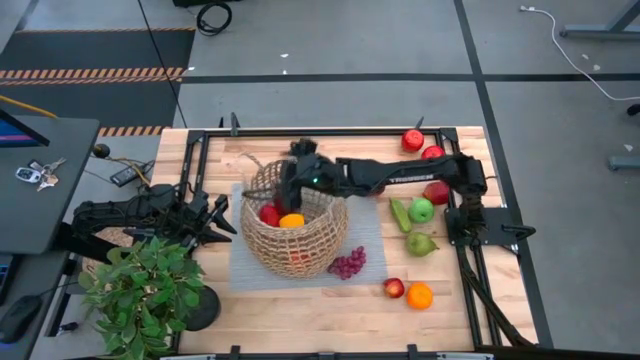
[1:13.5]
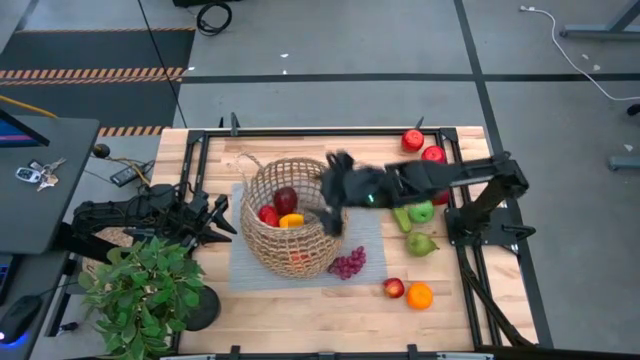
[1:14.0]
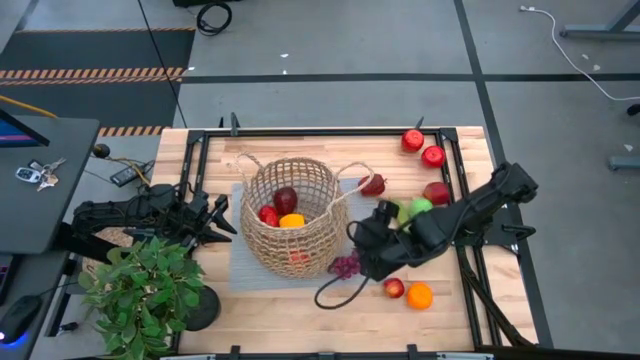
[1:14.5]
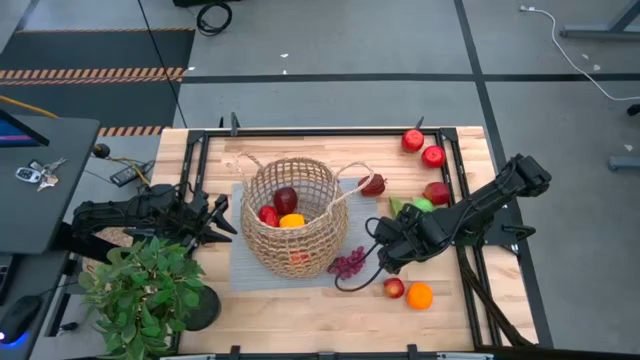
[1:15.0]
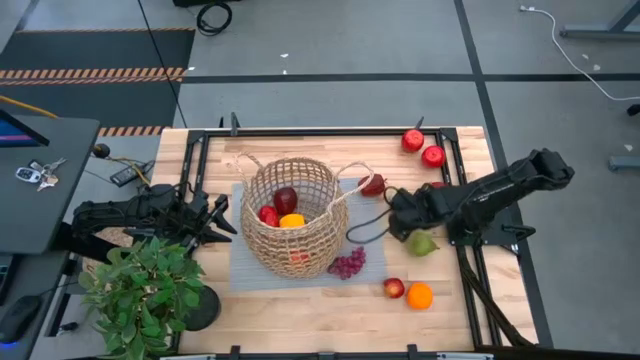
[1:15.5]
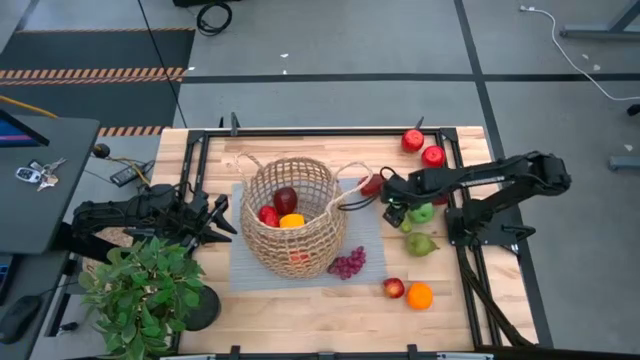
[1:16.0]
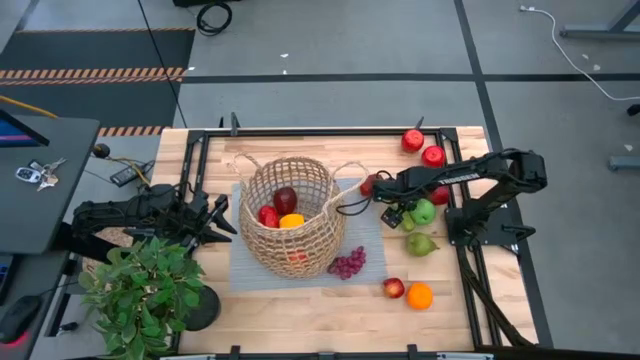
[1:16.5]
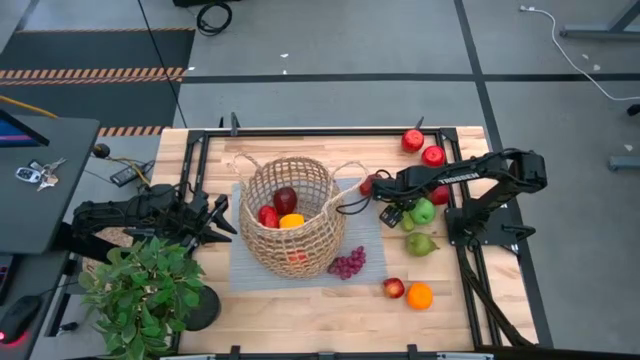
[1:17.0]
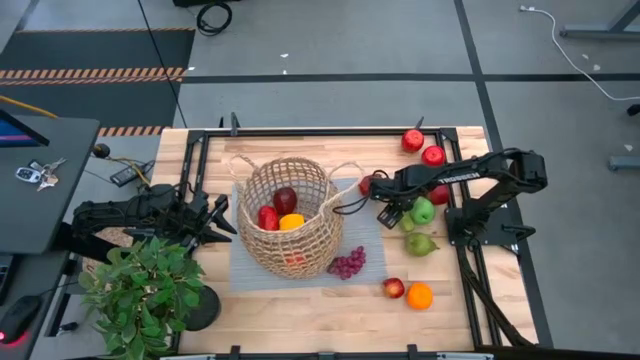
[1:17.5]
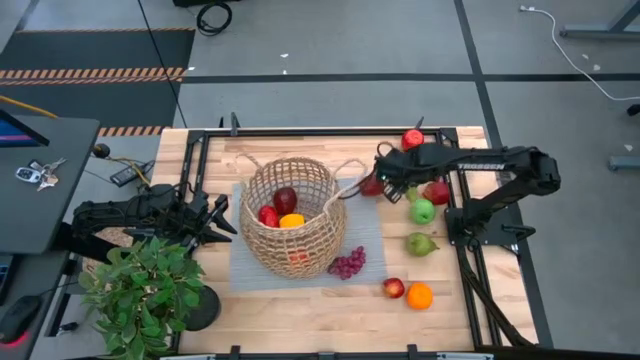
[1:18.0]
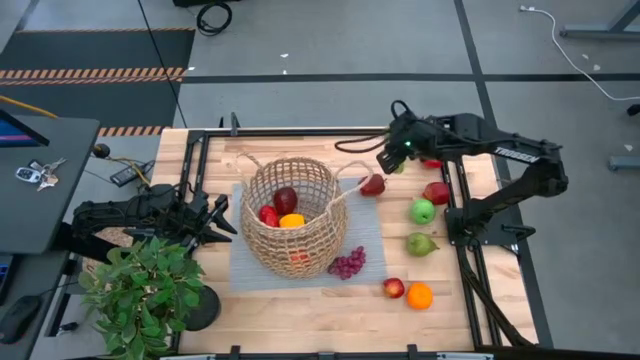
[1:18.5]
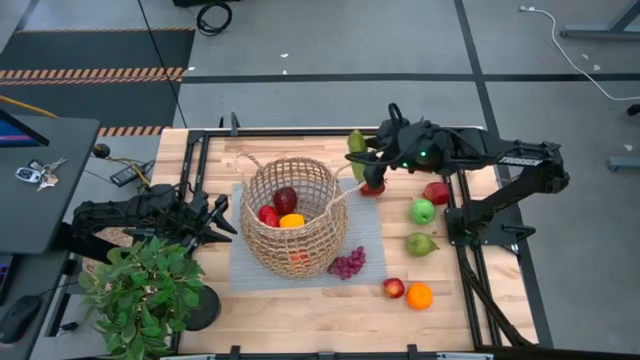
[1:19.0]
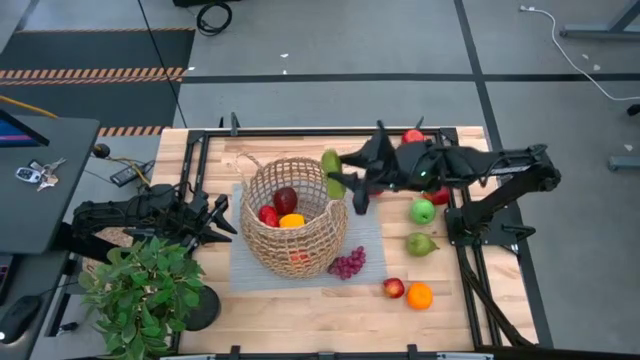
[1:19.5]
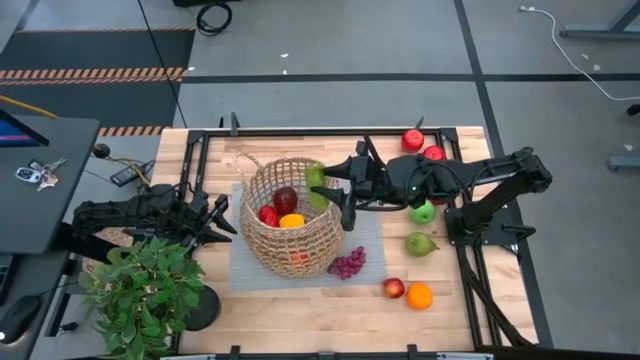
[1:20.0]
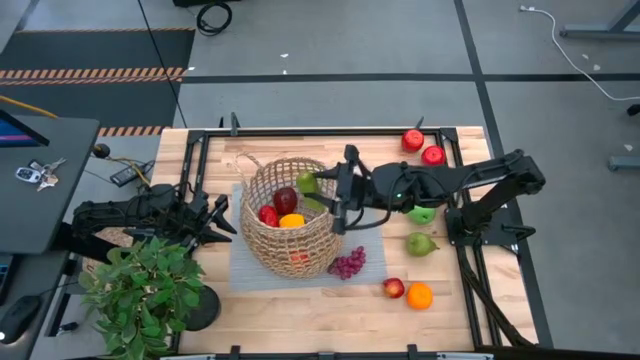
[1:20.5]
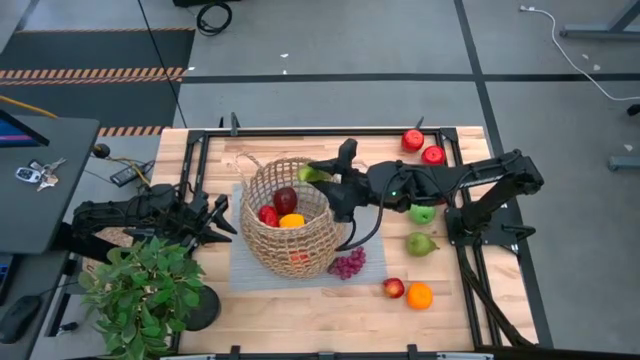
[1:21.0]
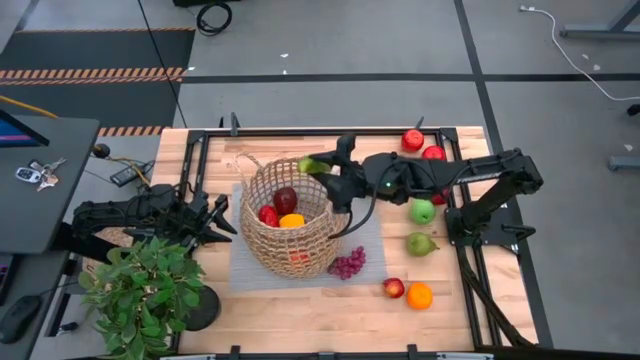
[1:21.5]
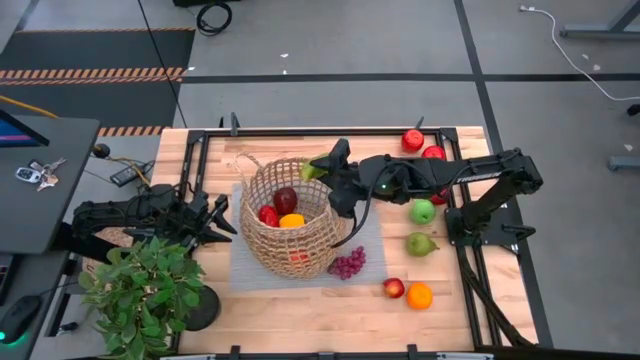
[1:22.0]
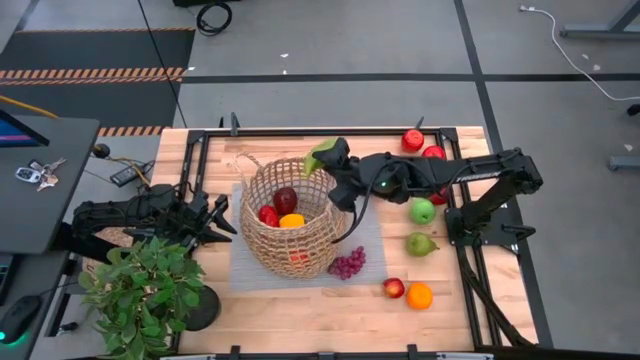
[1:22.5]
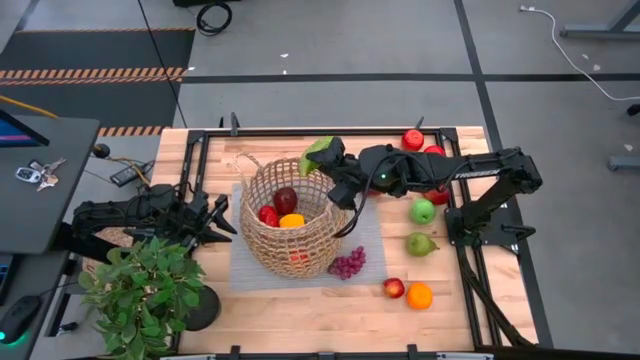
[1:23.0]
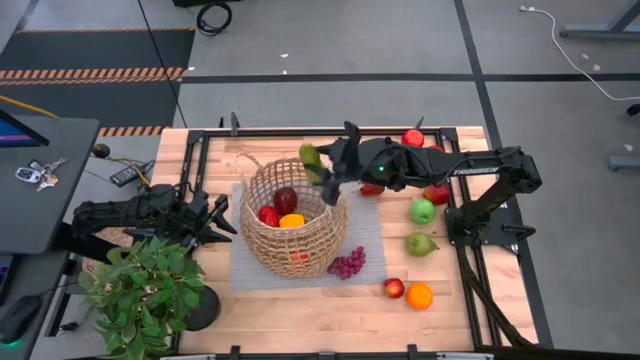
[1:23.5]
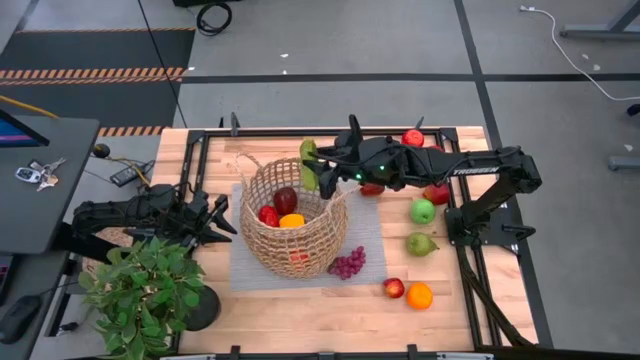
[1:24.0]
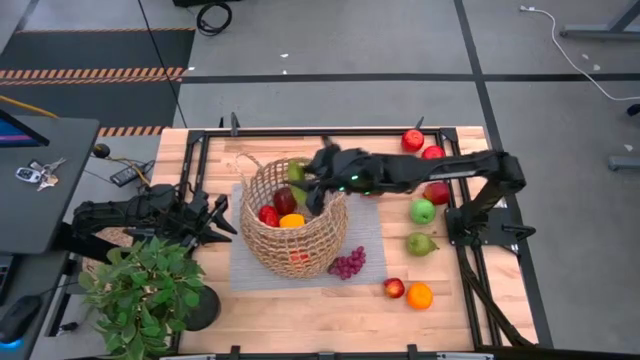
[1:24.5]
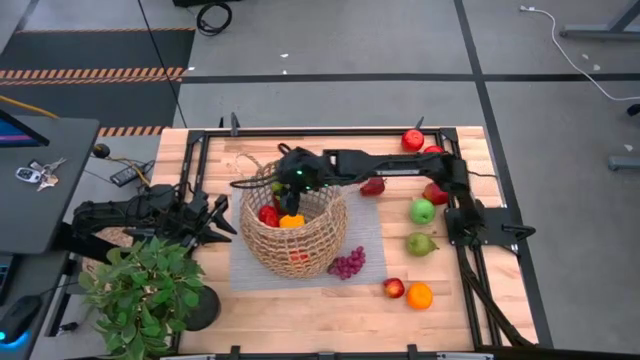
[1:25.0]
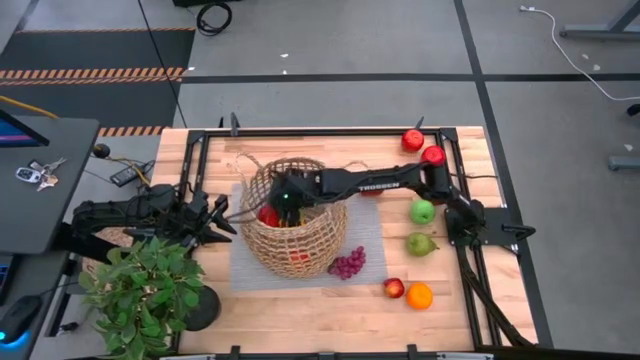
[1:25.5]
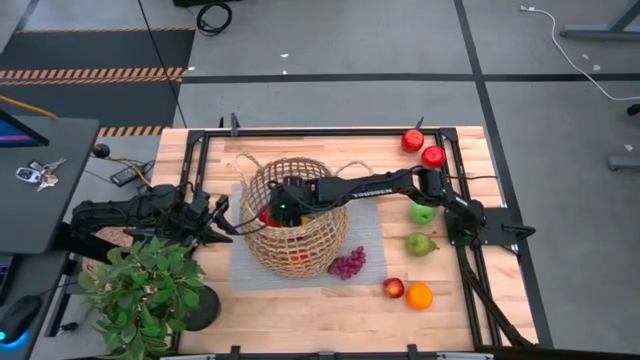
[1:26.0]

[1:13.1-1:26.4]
Task: Build produce basket
Put the cucumber into the brown basket

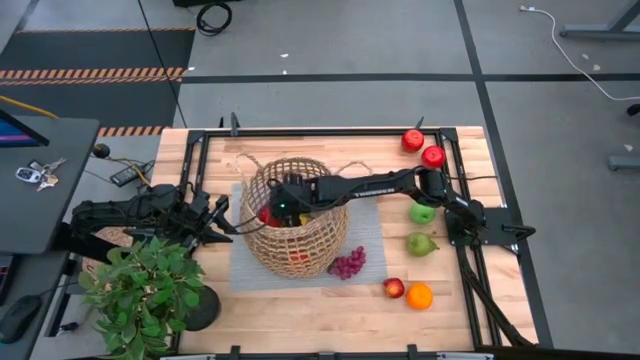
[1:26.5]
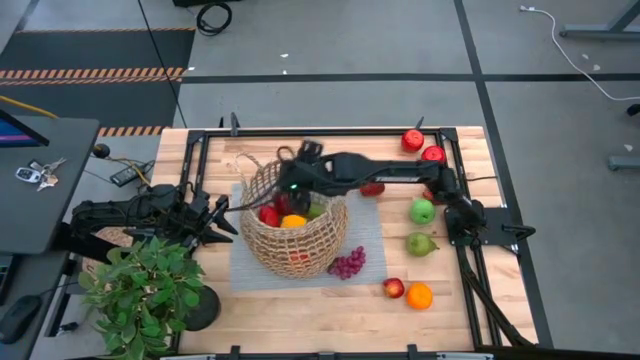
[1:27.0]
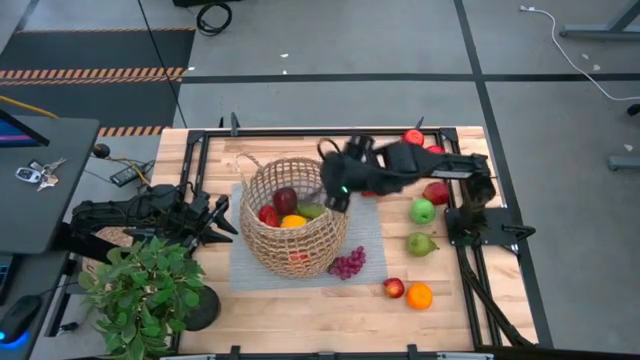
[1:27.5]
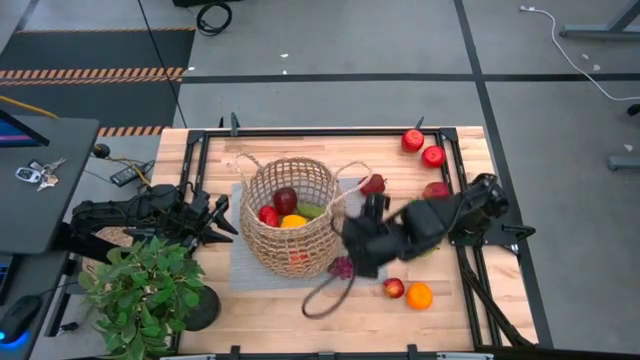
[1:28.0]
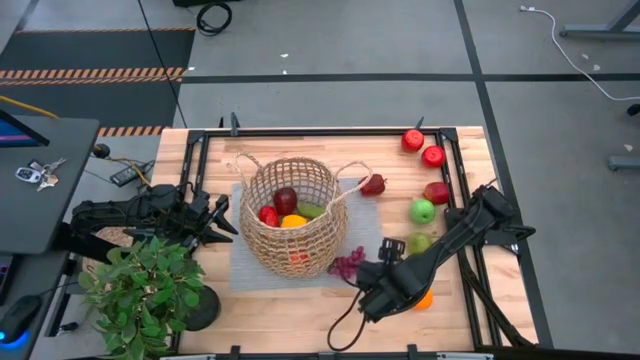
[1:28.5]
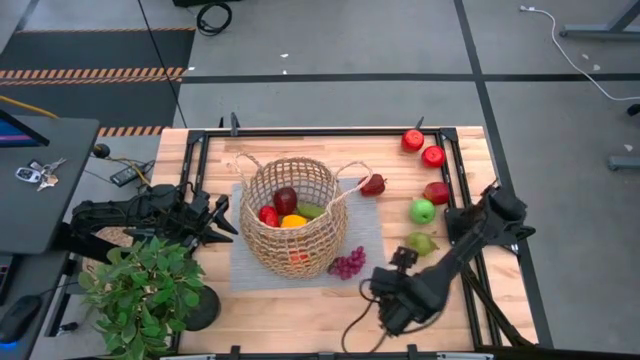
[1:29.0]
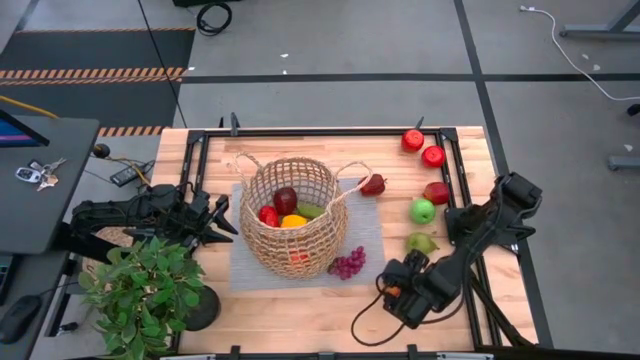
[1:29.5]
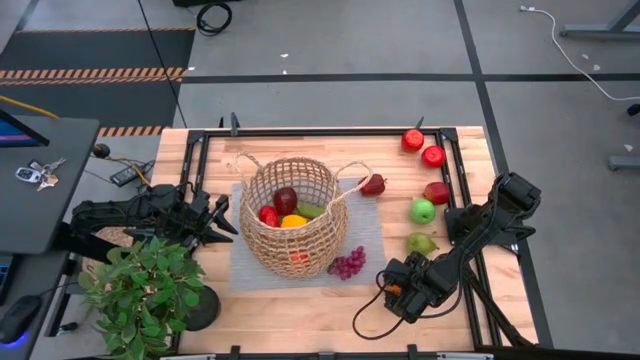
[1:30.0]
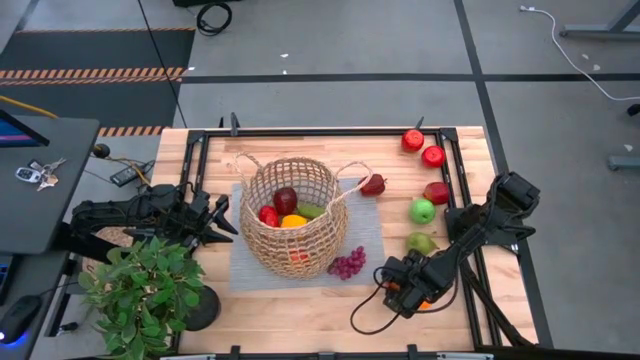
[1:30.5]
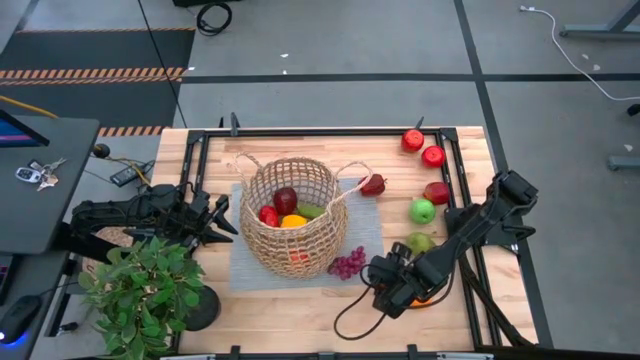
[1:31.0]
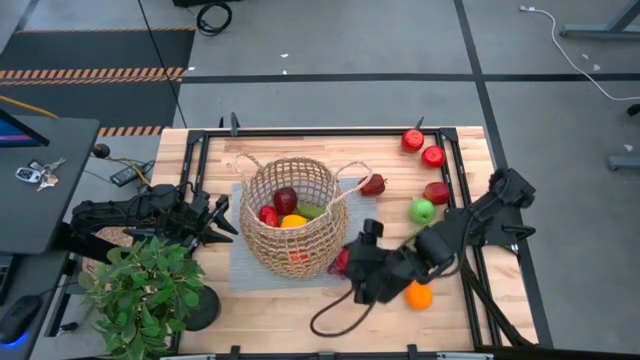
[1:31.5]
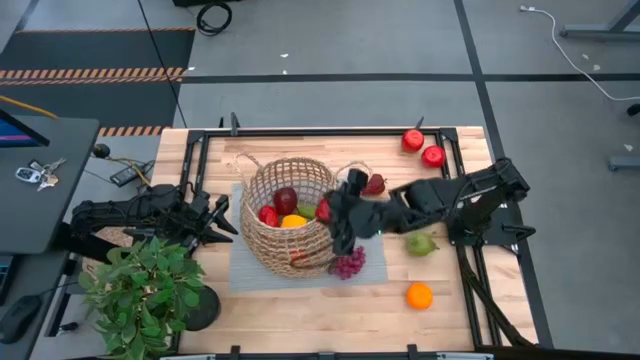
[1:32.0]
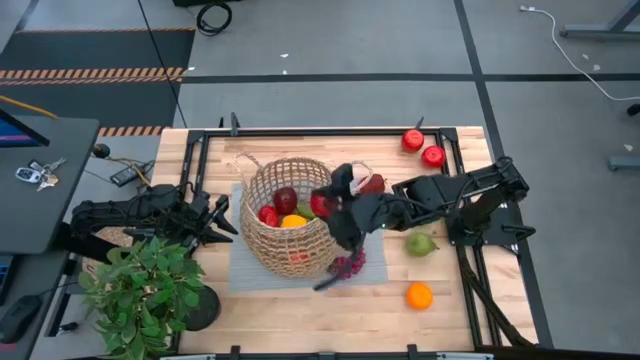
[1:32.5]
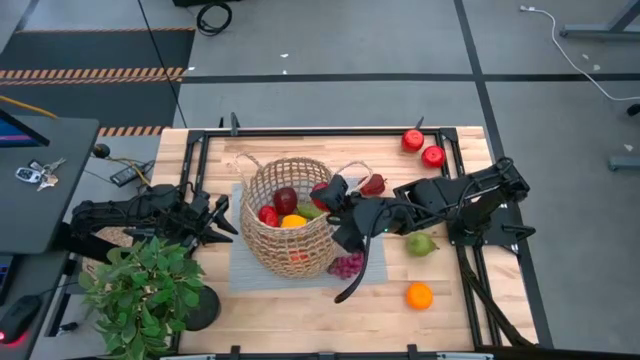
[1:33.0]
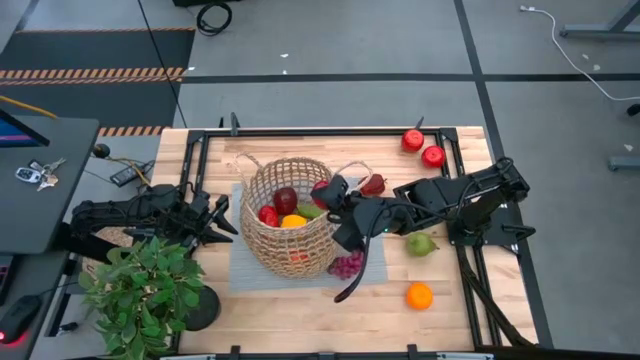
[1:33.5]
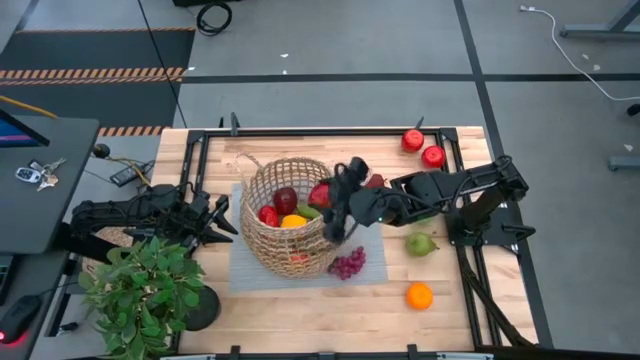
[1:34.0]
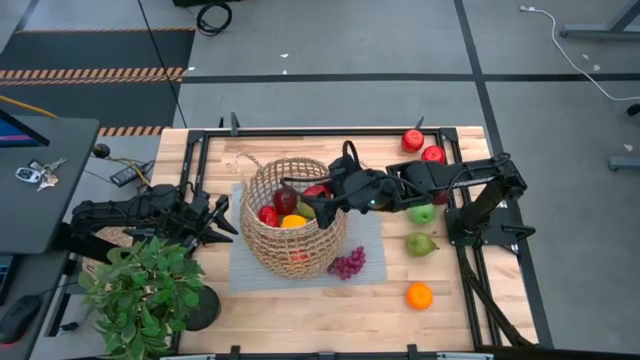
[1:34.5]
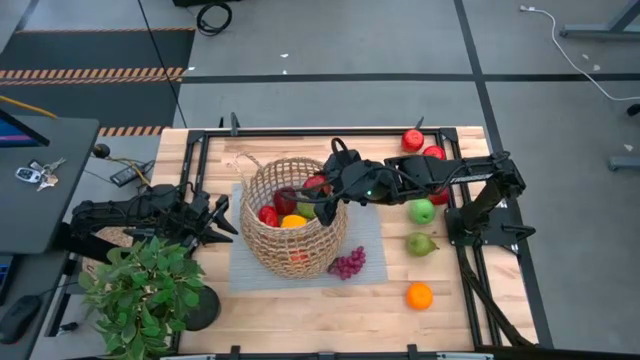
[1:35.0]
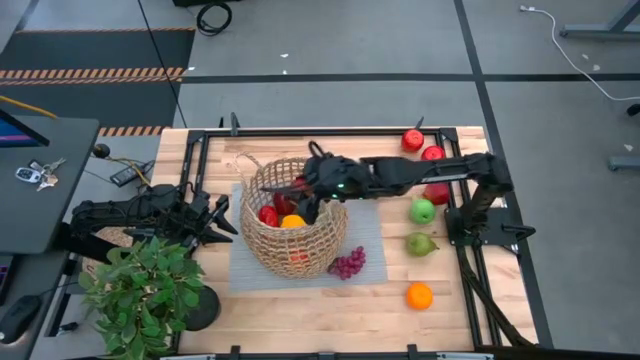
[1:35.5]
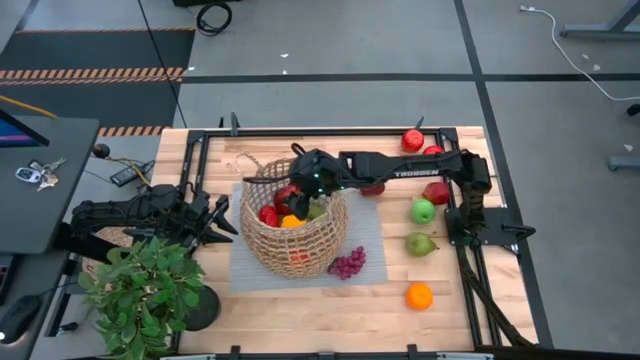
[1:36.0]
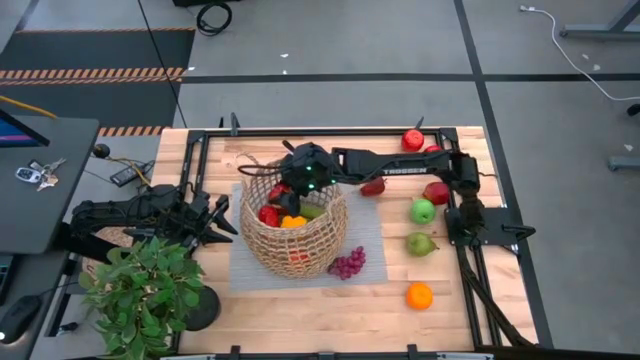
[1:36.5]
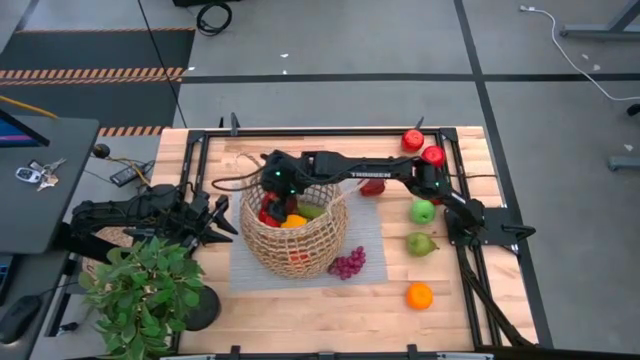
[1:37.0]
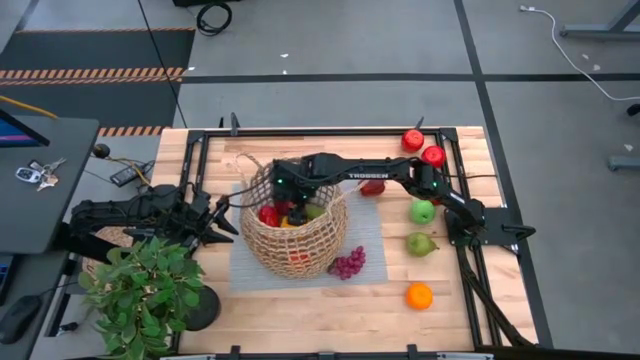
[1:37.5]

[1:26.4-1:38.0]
Put the red apple into the brown basket
